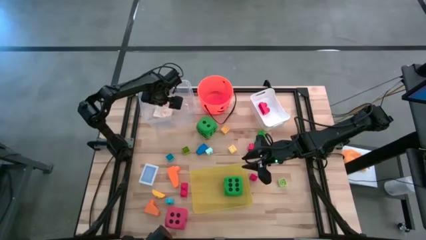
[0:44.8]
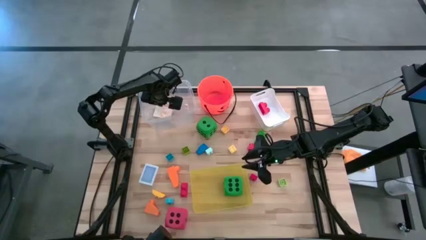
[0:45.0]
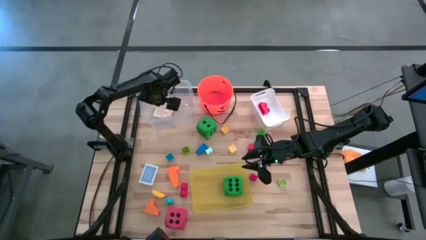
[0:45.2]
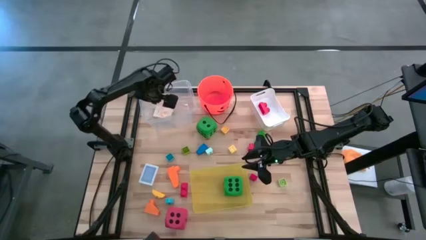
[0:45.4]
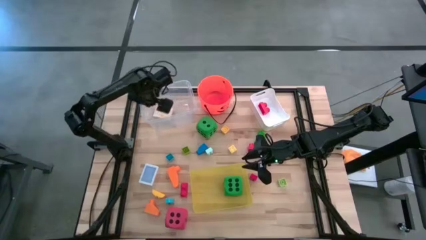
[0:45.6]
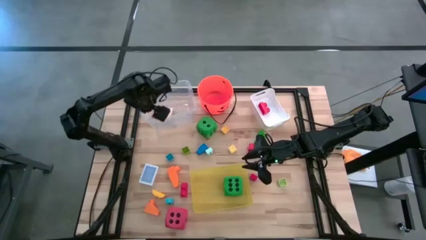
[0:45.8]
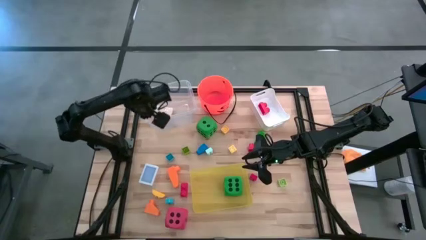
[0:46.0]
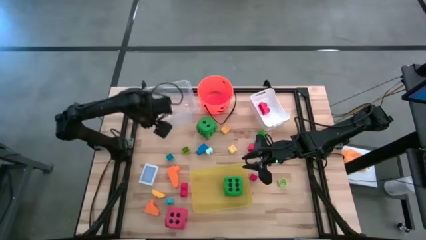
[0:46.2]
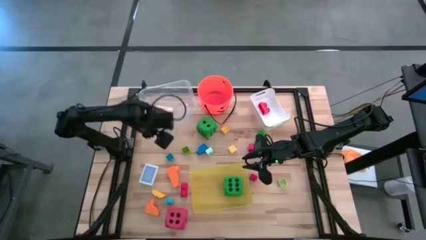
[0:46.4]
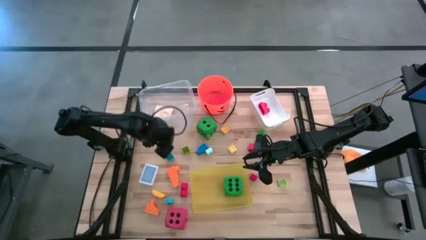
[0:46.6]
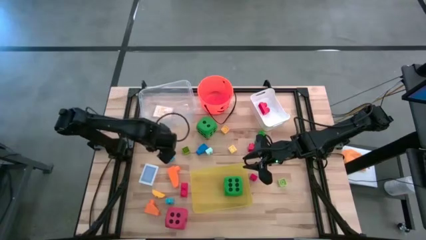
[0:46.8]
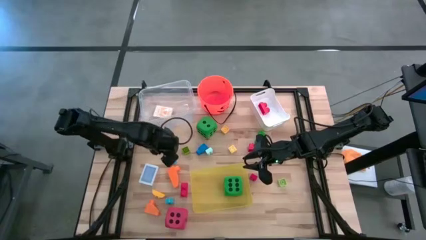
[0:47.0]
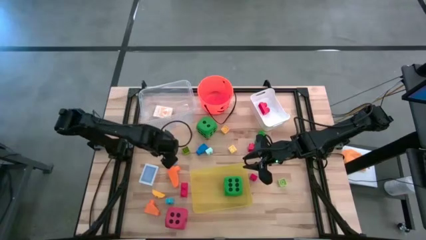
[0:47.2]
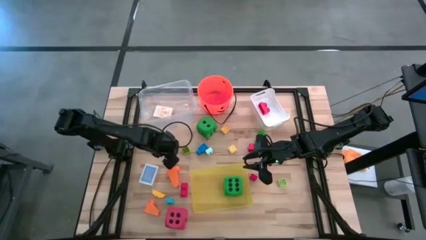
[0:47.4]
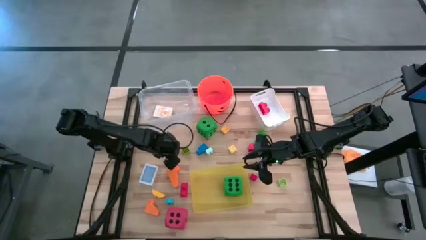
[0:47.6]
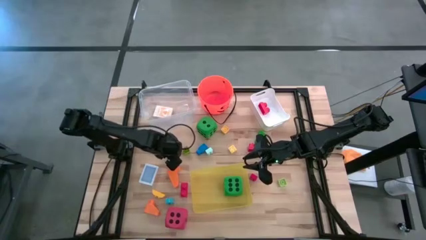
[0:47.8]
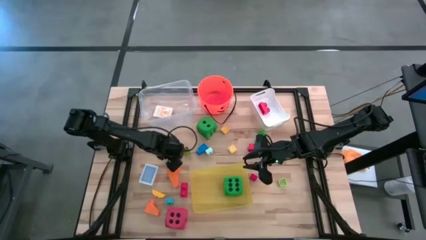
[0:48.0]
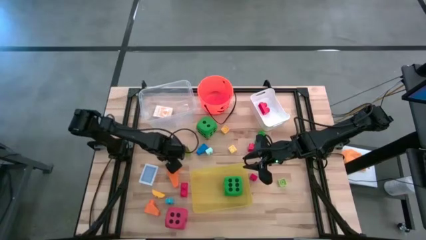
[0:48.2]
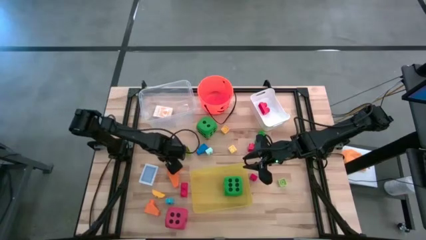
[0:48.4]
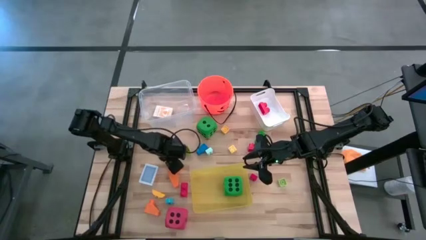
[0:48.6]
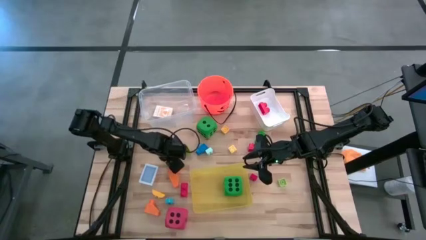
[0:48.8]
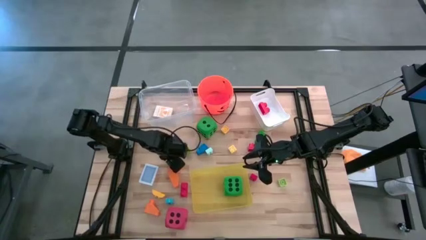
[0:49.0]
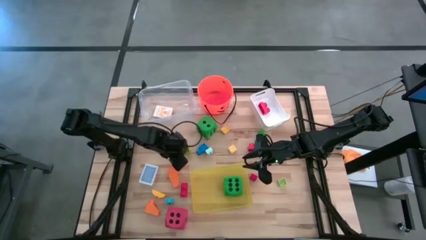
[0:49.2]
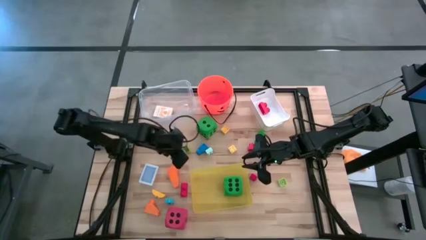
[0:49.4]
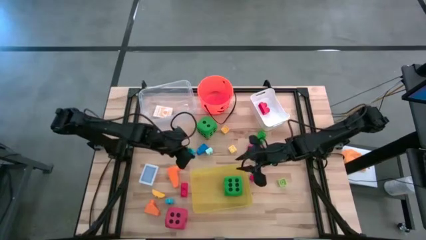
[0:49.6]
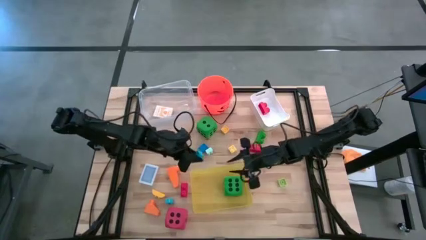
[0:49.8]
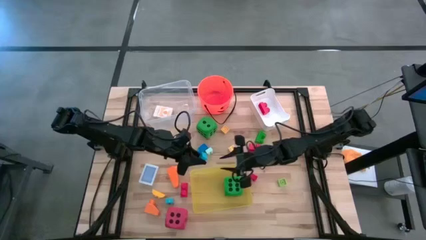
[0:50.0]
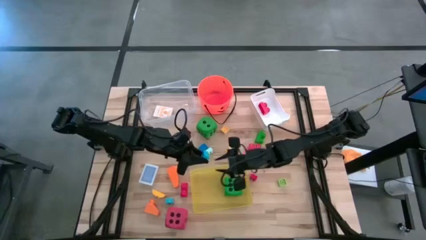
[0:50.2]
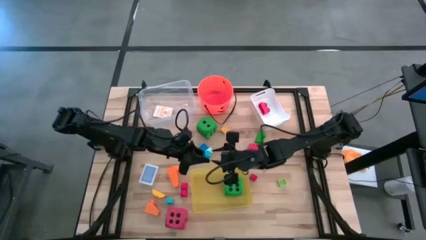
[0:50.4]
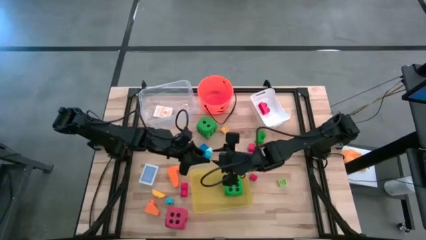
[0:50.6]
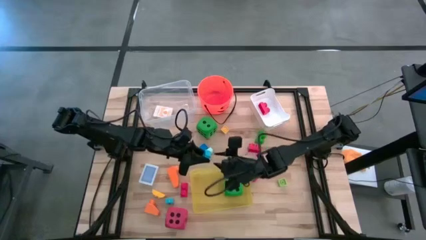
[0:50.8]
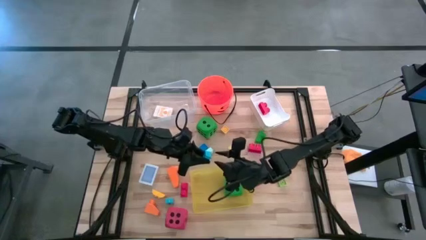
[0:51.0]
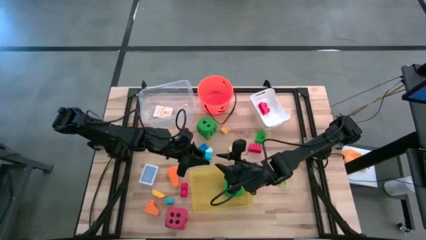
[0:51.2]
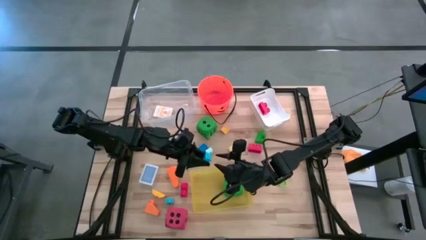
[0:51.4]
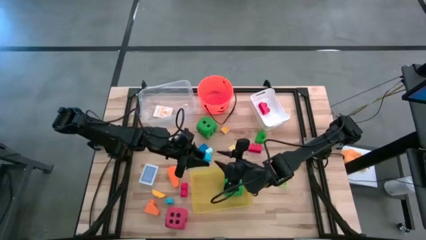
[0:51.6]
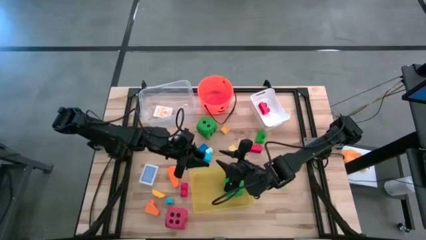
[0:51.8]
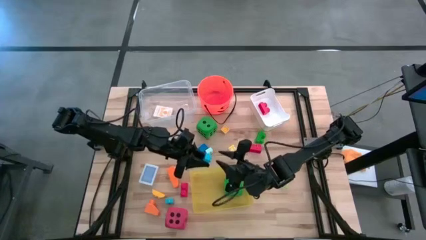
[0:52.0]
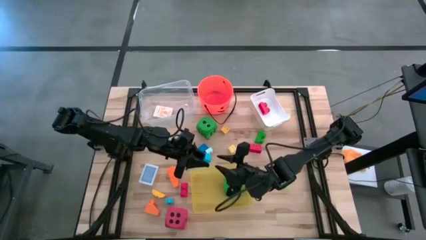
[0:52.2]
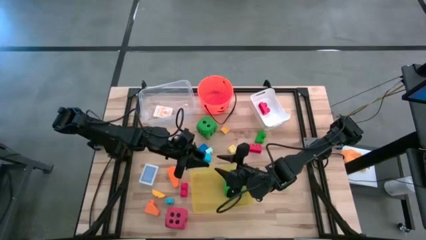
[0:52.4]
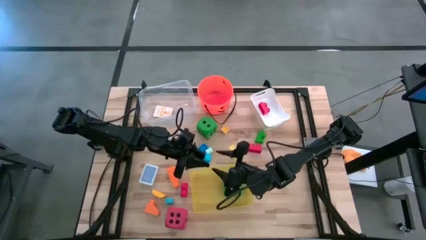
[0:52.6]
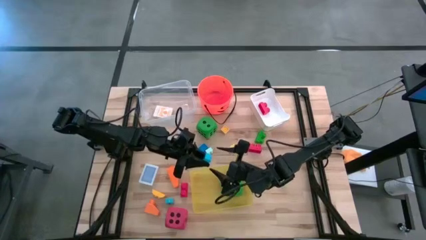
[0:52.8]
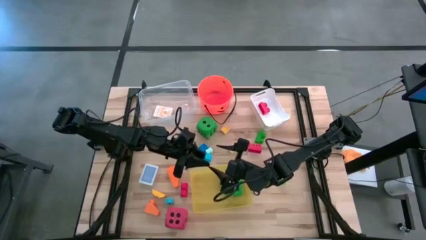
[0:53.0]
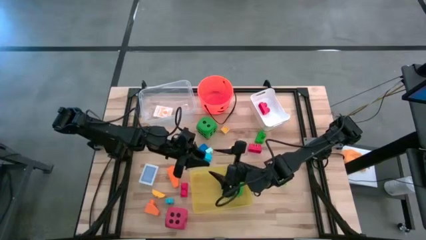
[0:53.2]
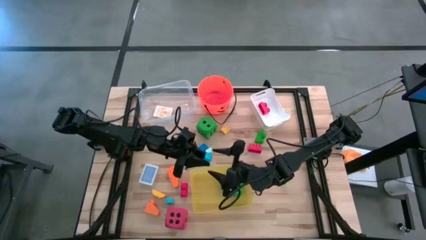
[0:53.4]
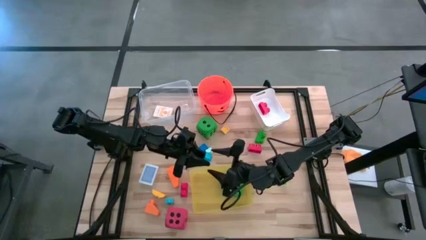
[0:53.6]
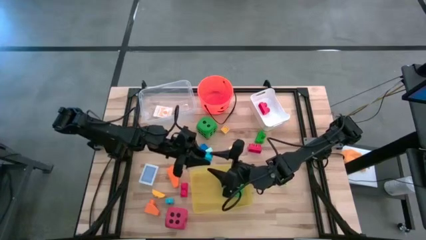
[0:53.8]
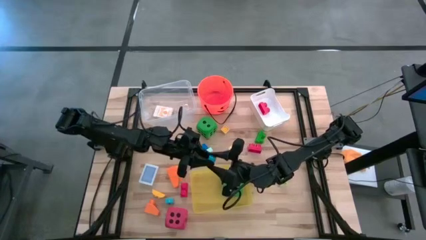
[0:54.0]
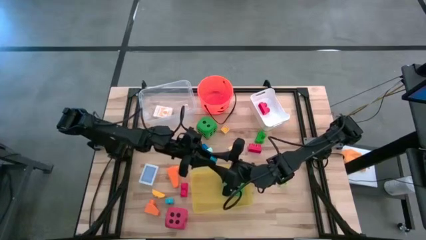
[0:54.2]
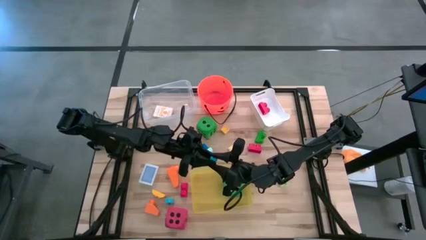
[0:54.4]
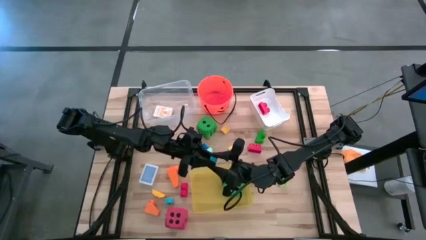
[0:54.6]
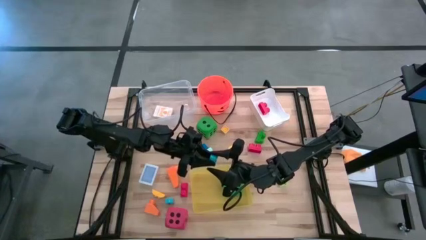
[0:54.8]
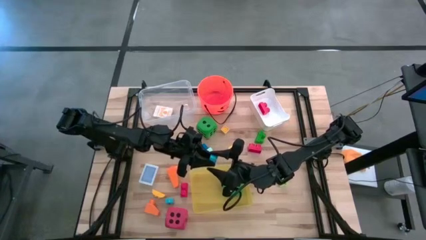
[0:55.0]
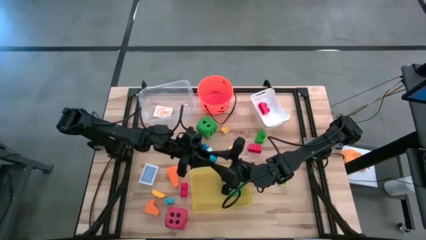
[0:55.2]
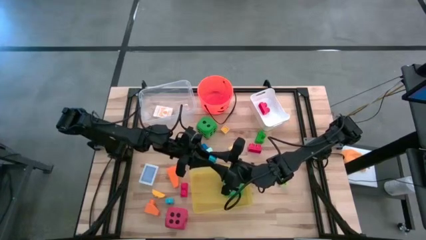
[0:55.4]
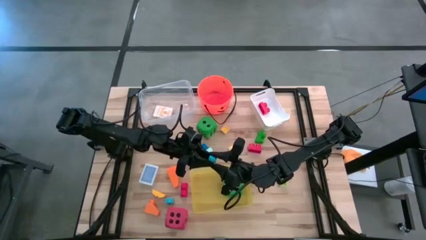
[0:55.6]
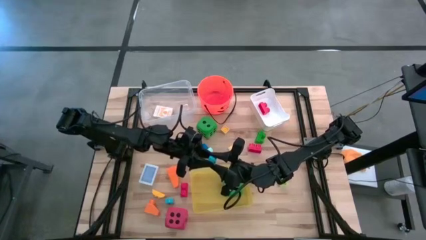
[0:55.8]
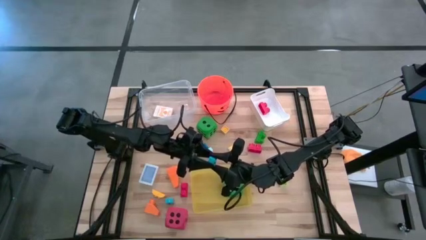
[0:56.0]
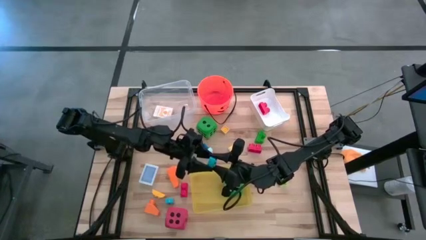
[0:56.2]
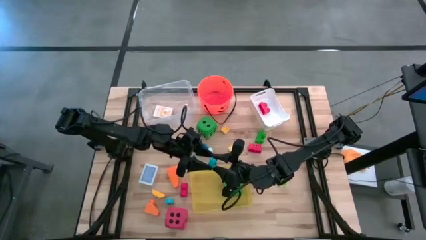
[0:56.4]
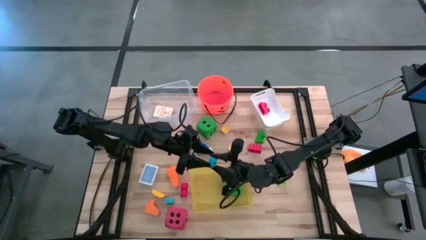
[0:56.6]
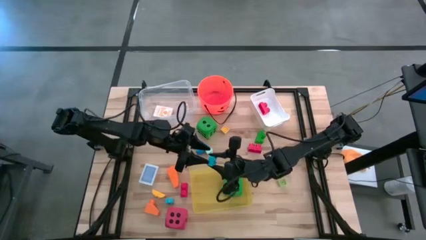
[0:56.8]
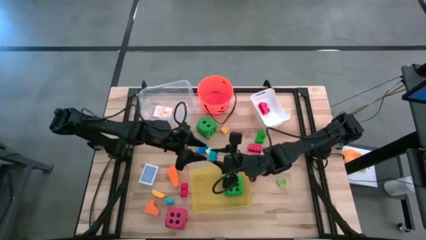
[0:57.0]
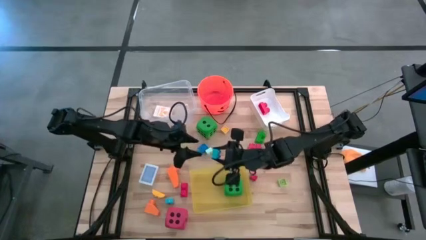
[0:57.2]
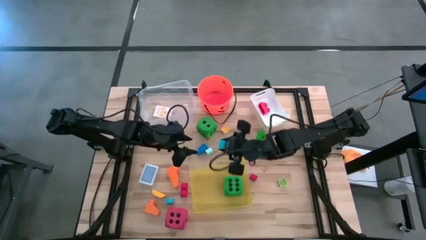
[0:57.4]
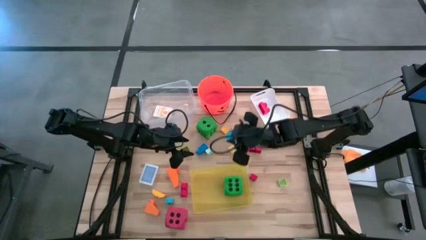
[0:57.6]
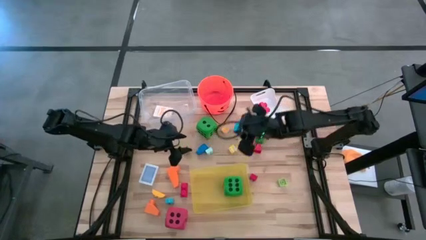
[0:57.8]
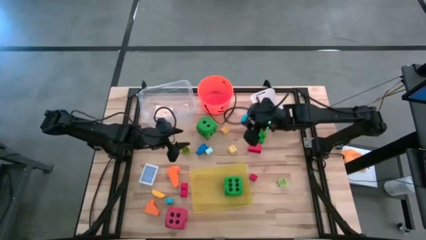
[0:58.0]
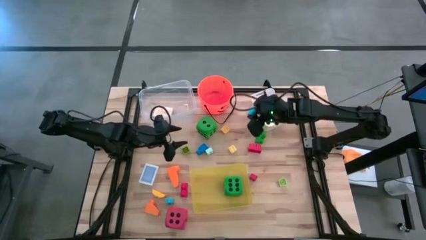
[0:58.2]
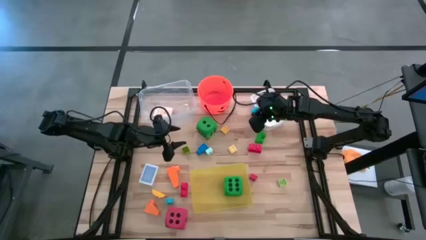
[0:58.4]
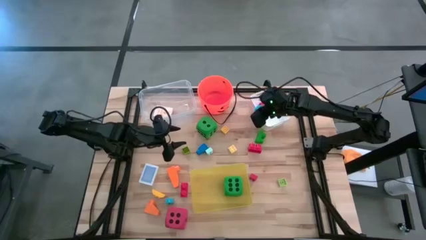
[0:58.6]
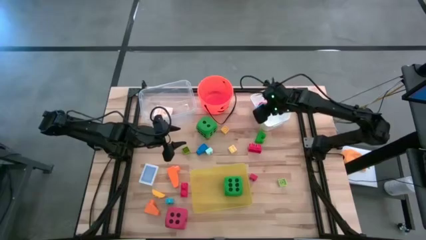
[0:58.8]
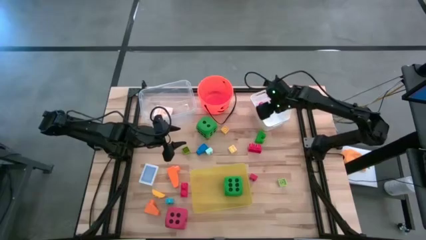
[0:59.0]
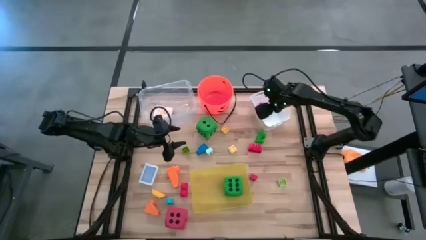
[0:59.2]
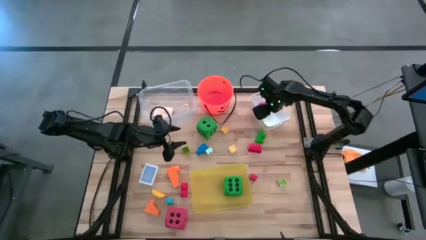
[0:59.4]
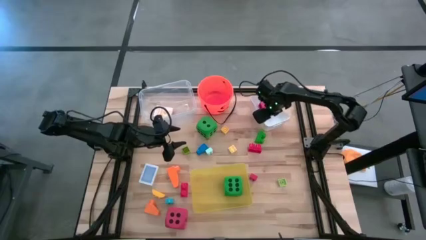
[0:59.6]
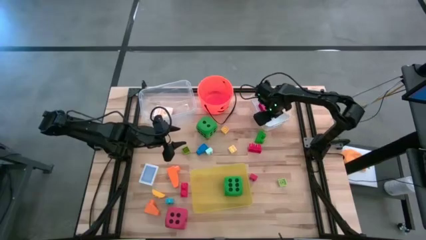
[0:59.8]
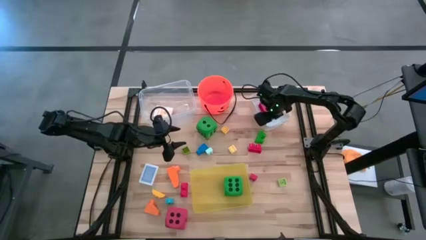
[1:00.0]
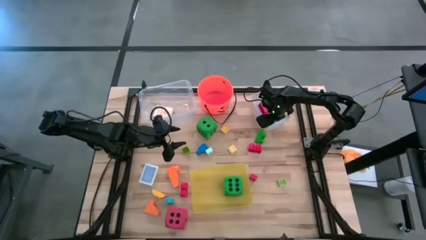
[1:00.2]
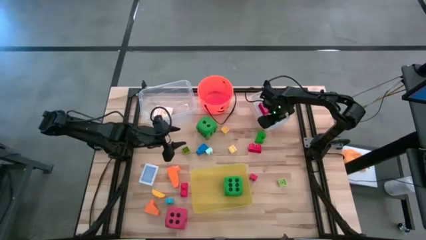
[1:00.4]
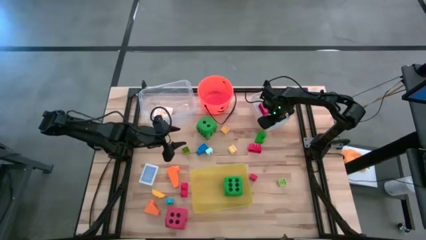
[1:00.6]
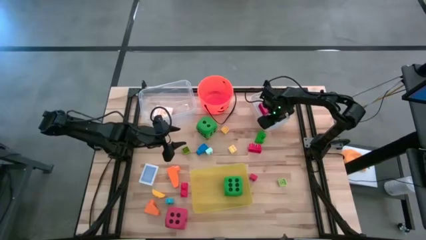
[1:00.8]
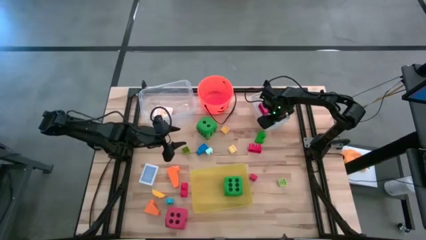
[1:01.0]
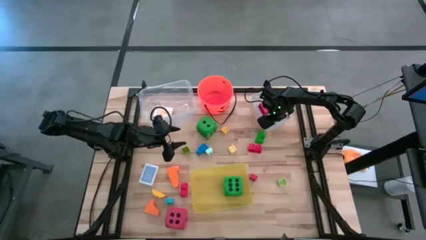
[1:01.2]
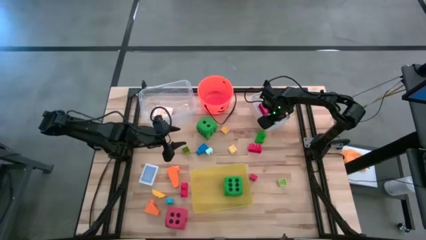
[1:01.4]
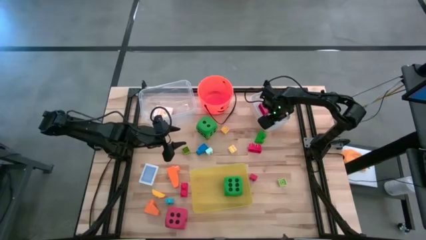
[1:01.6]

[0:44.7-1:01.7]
Task: Pick & Place Toys
Put the light blue game piece into the white bin
